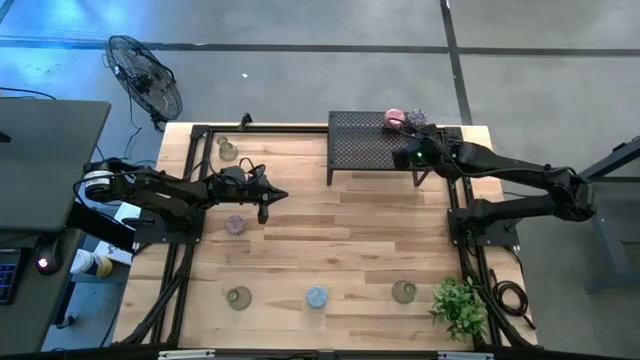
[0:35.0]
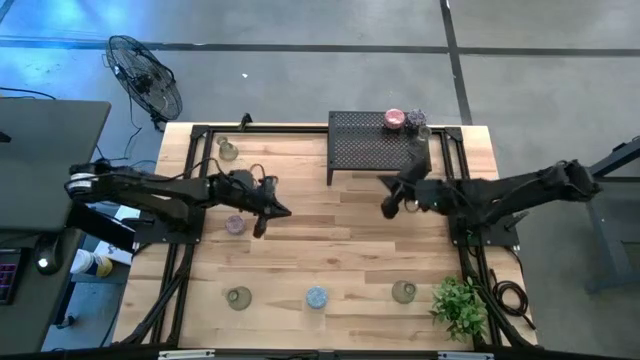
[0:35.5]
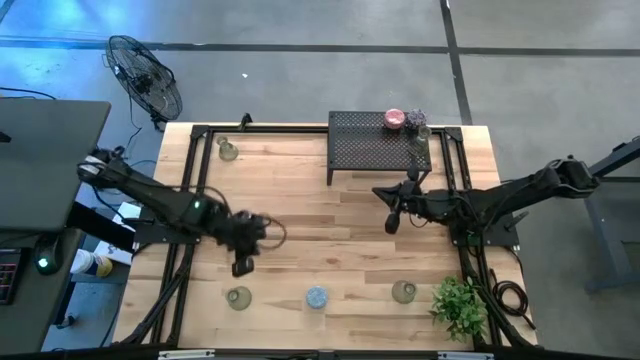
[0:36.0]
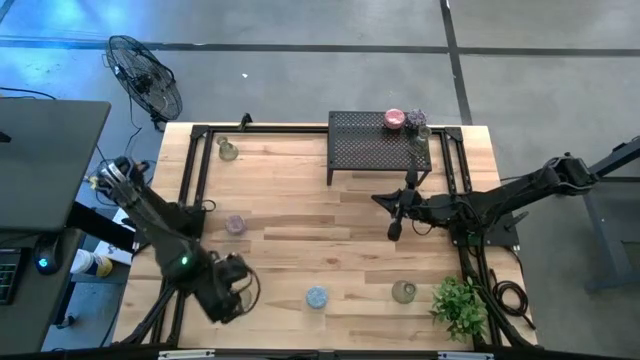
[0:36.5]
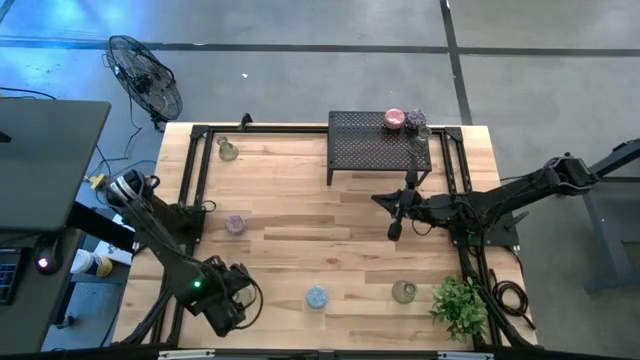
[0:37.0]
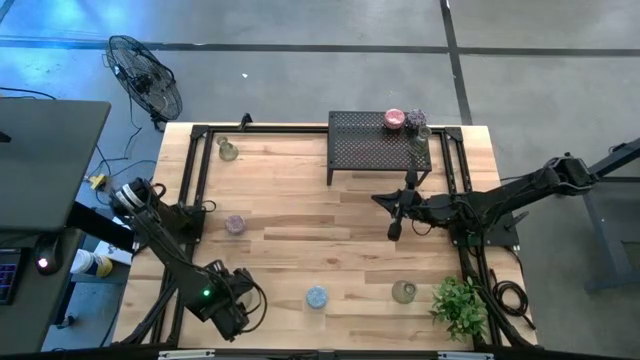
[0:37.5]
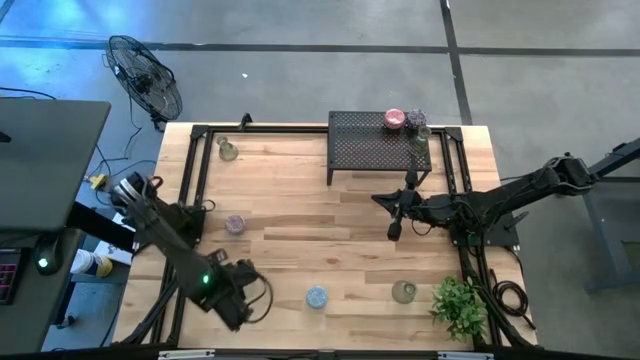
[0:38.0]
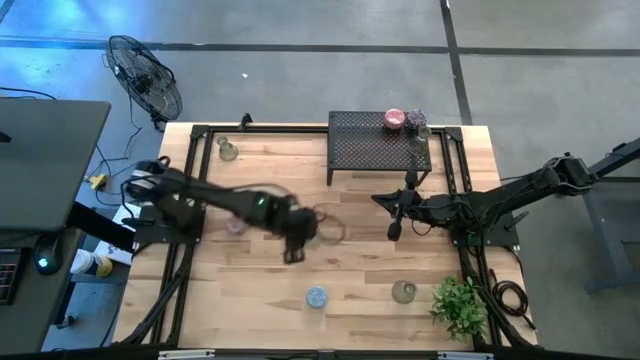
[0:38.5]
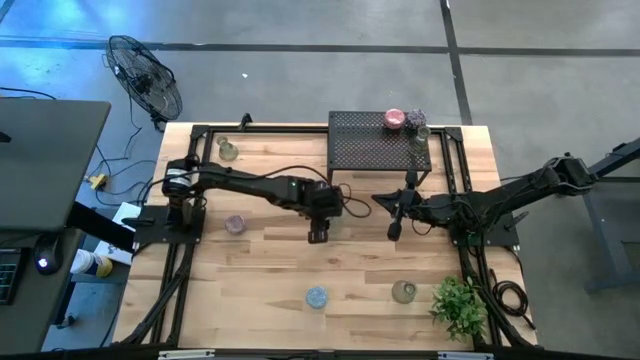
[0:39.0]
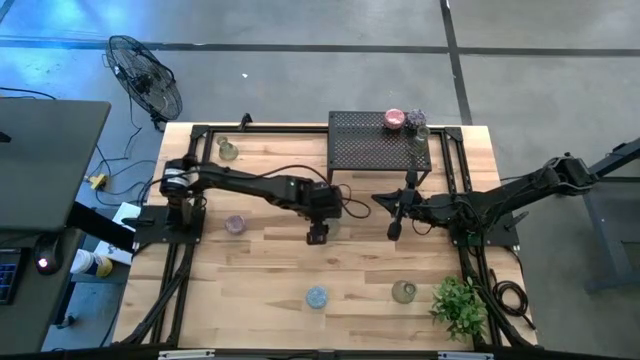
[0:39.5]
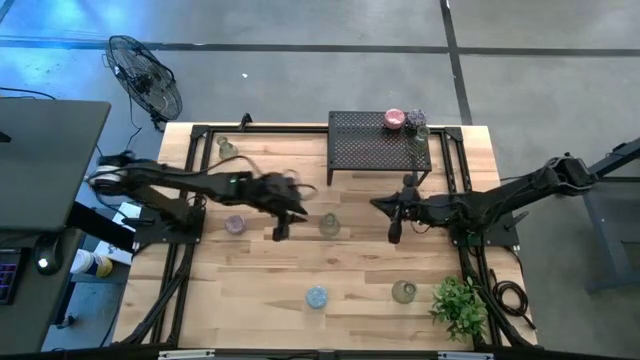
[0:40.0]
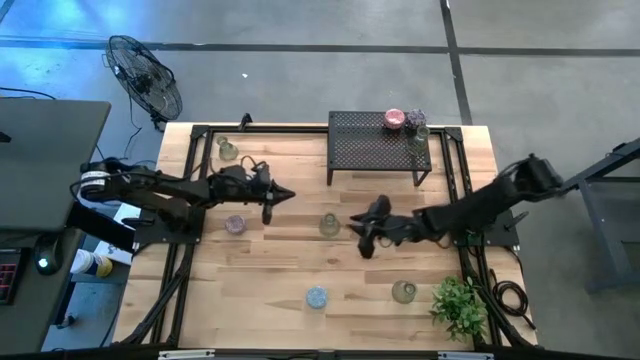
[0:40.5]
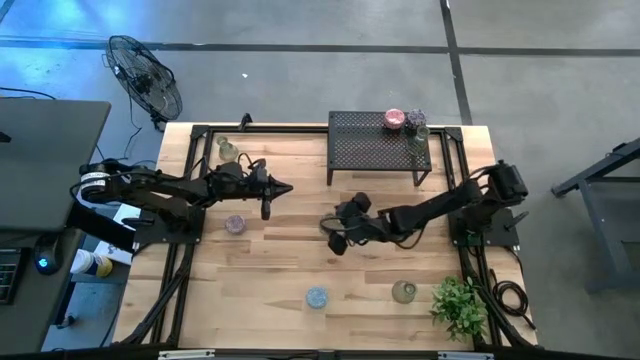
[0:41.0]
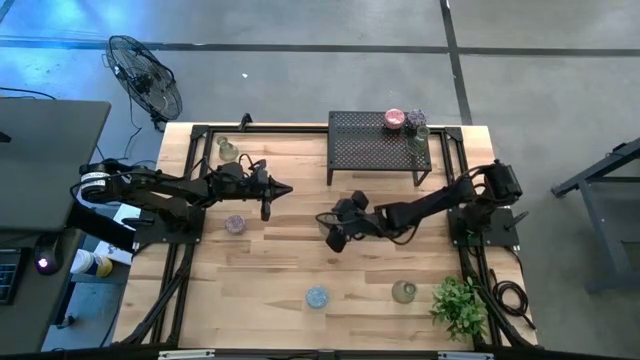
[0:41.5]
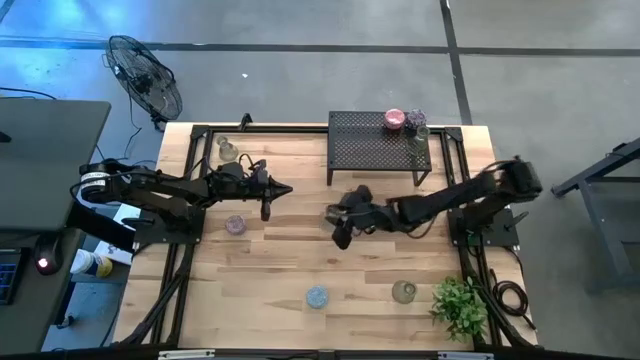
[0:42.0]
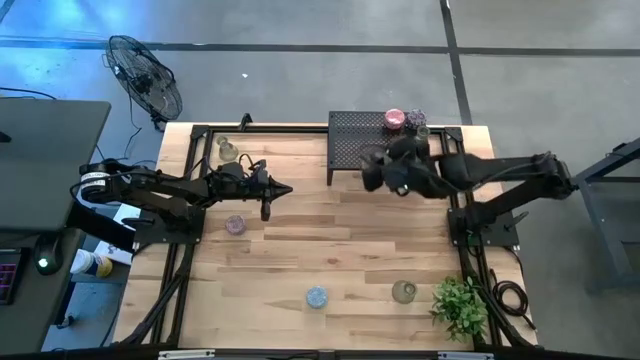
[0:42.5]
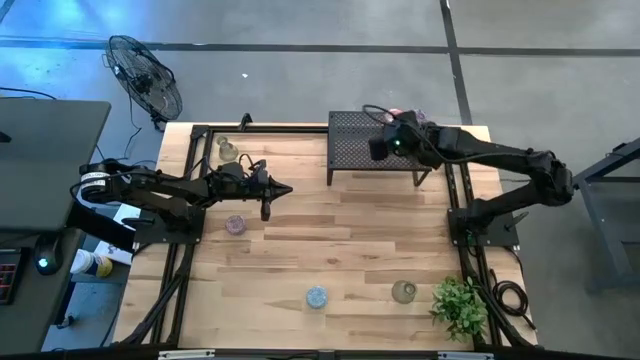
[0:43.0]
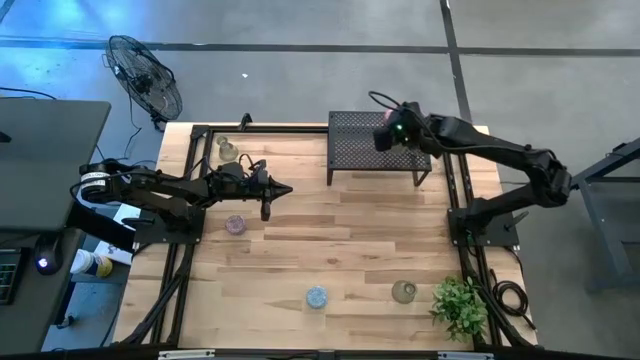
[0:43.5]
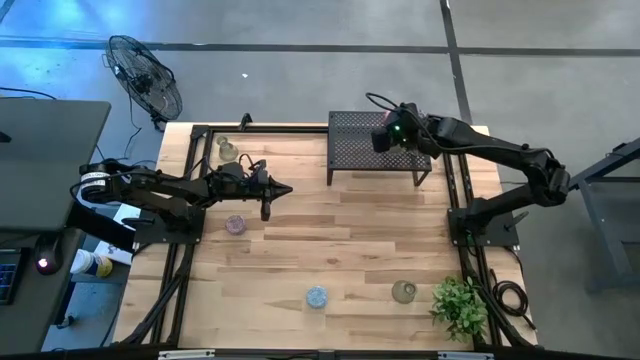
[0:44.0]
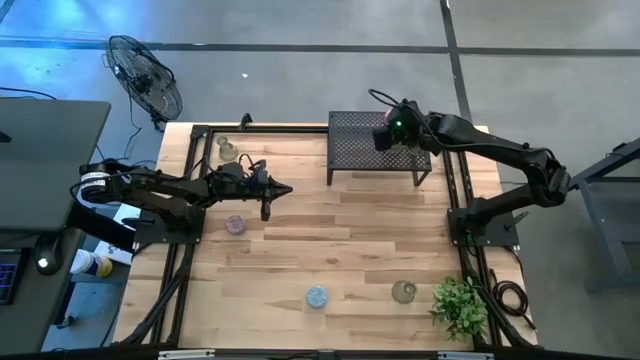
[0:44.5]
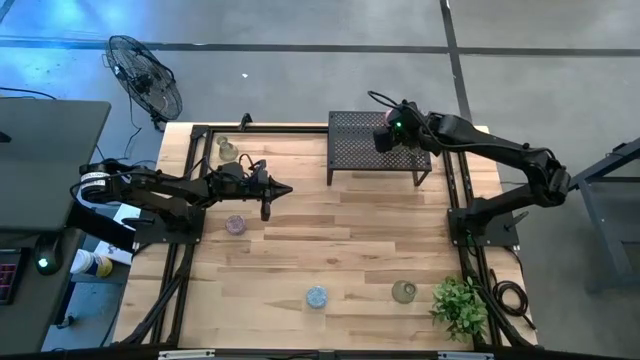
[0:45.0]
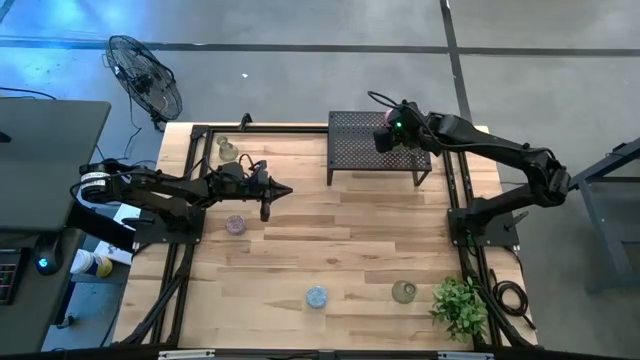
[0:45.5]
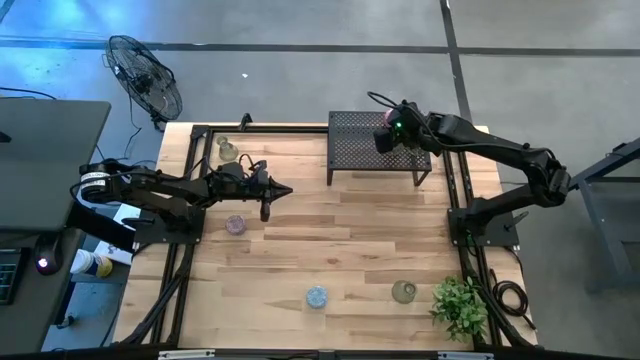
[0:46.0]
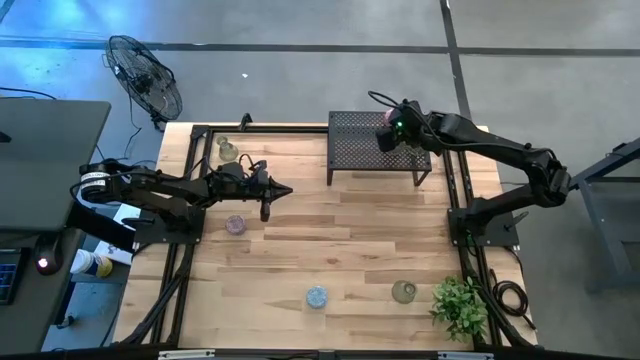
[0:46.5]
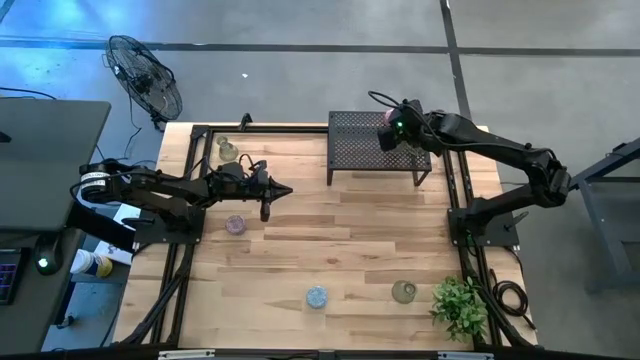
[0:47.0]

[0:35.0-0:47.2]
Task: Pick & Place candle stick holders
Put the green glass candle holder on the shelf aligned with the other green glass candle holder

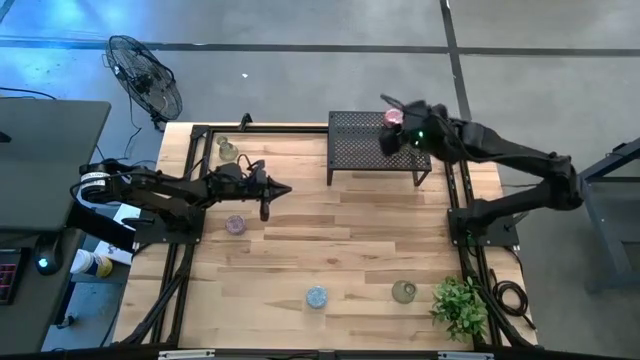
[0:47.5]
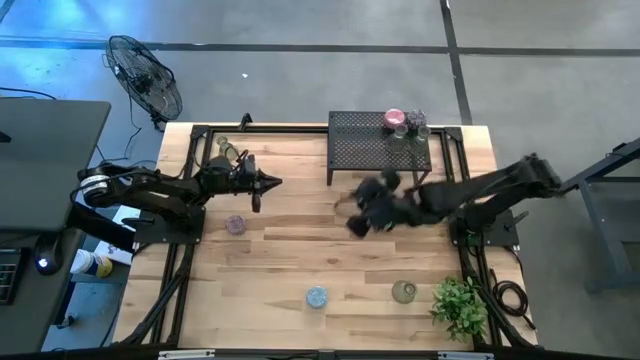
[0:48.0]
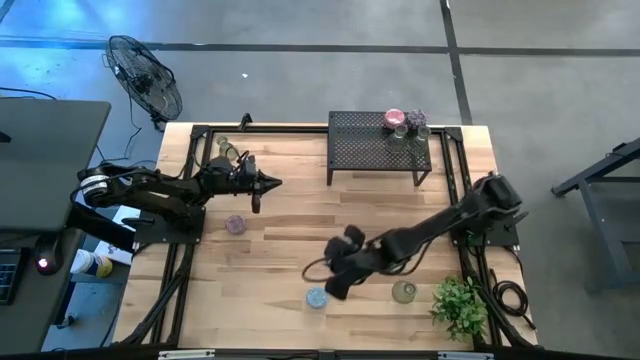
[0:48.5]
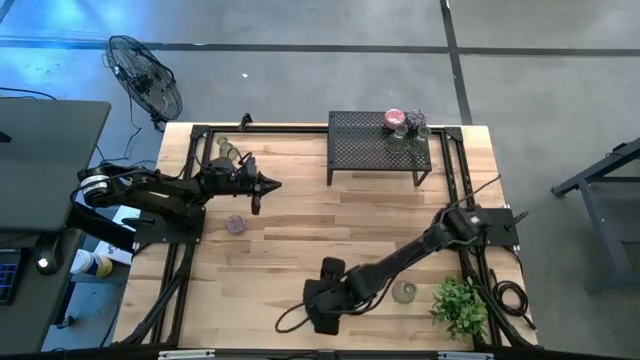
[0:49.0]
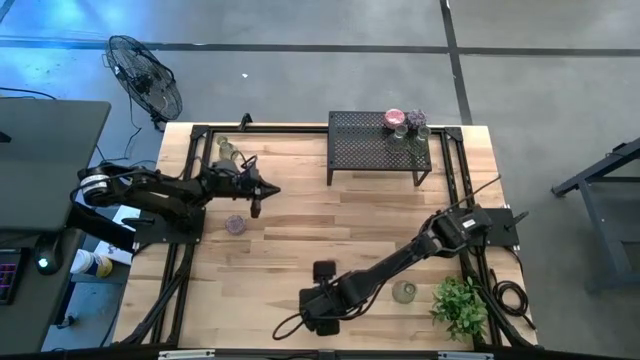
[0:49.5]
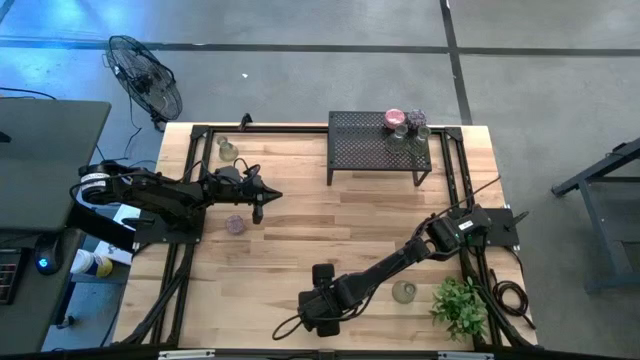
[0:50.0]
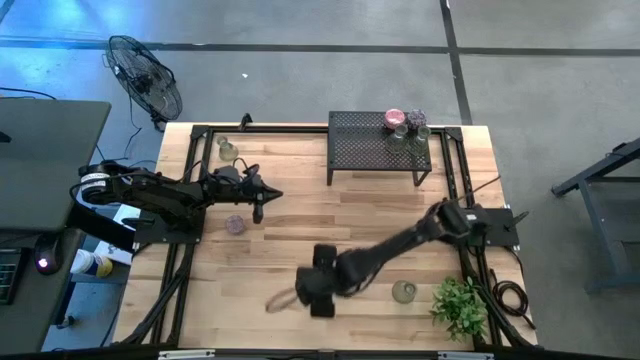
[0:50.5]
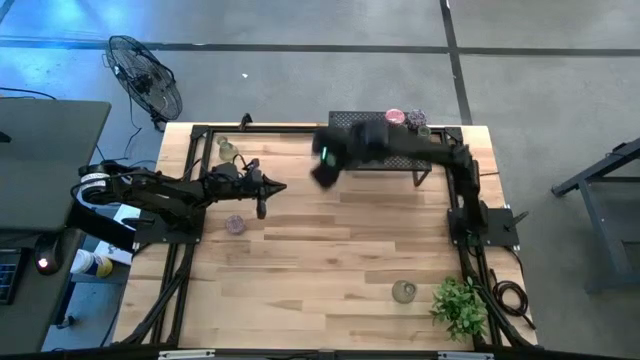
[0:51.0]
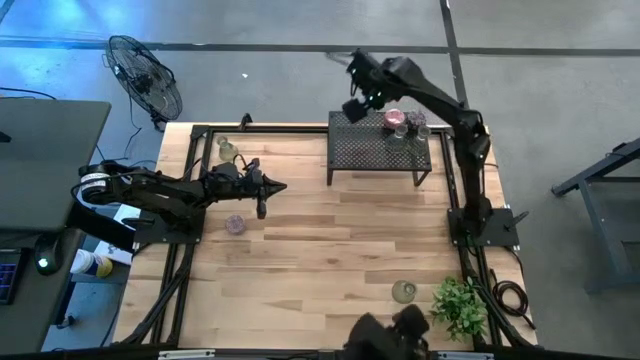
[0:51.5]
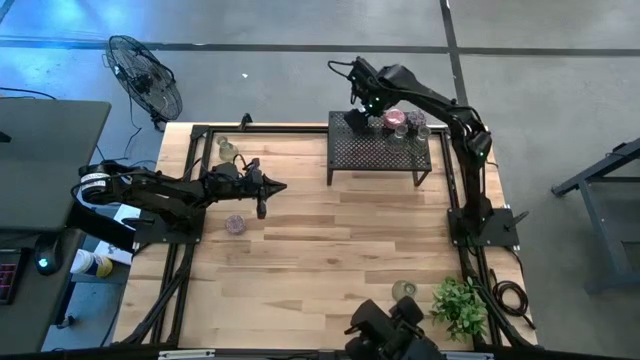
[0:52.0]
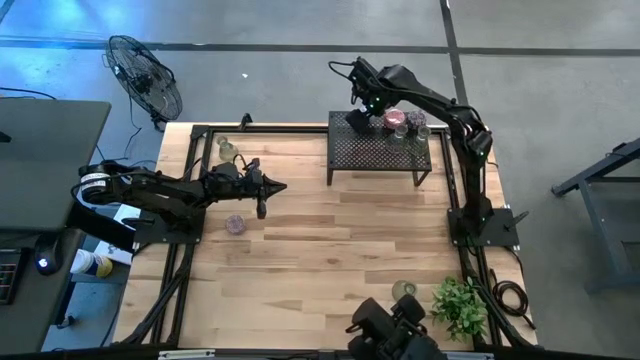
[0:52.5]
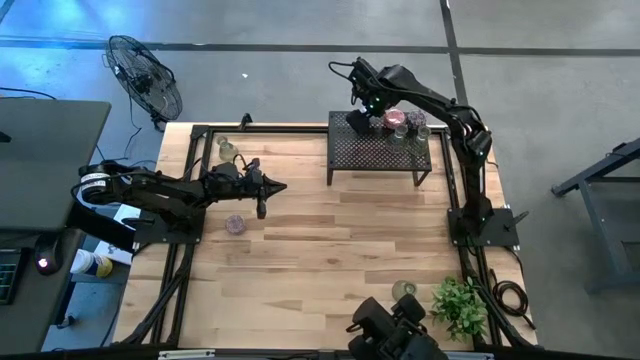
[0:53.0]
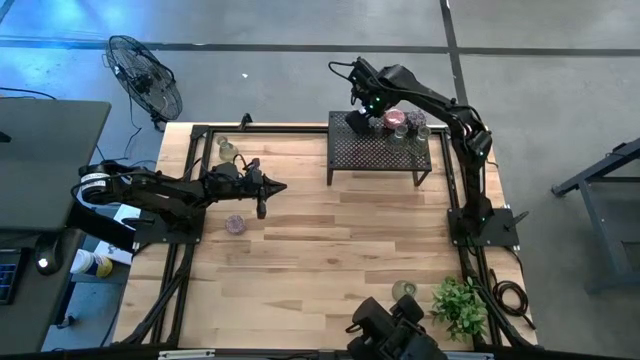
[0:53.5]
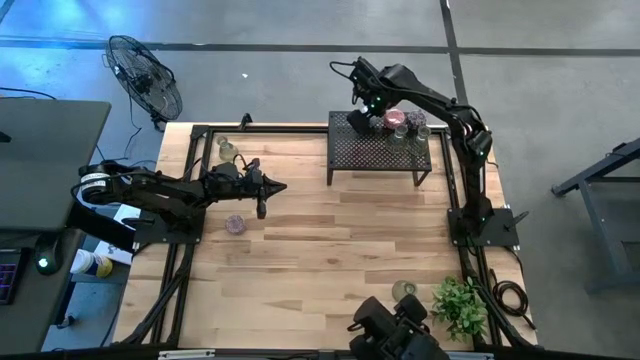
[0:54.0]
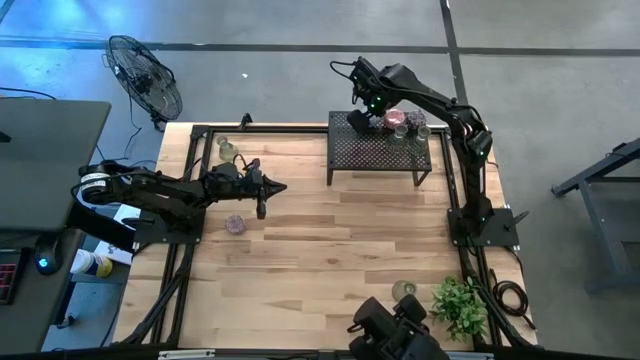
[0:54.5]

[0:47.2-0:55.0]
Put the blue scented candle on the shelf
